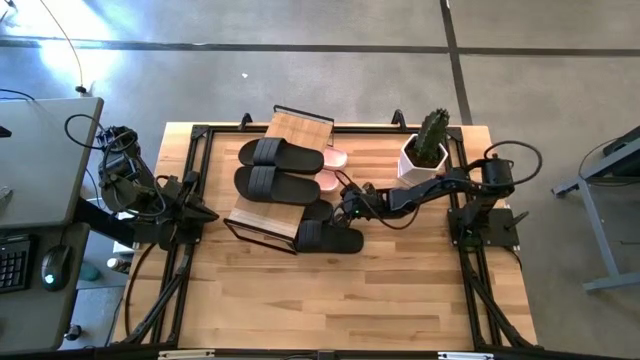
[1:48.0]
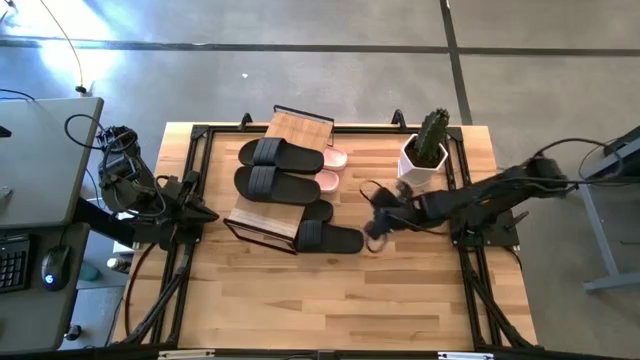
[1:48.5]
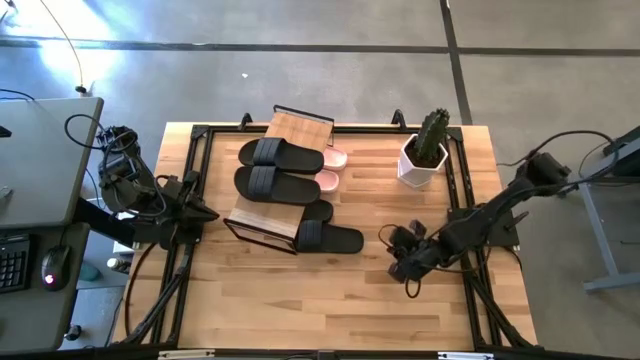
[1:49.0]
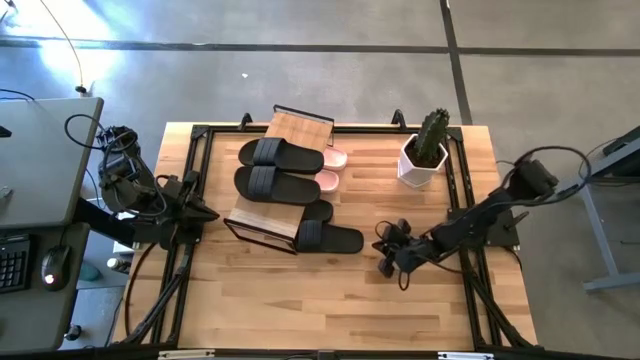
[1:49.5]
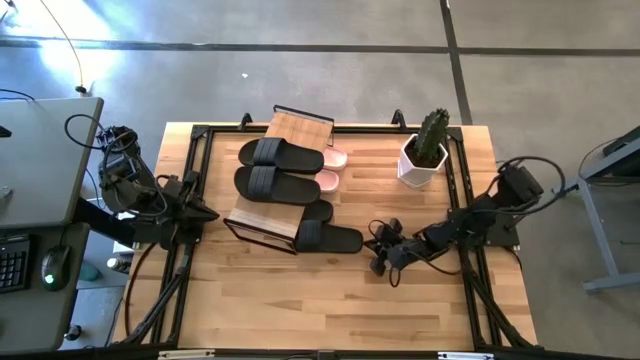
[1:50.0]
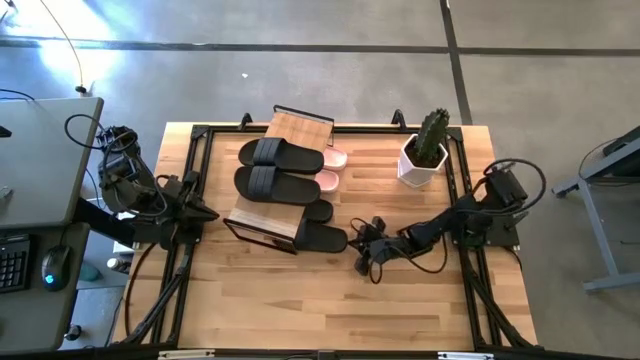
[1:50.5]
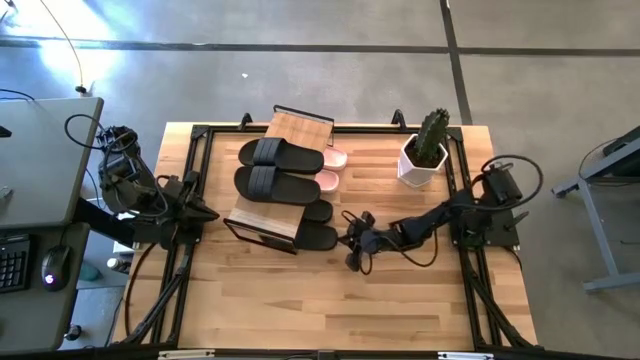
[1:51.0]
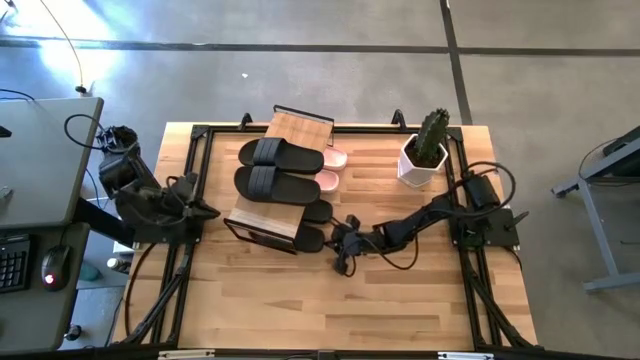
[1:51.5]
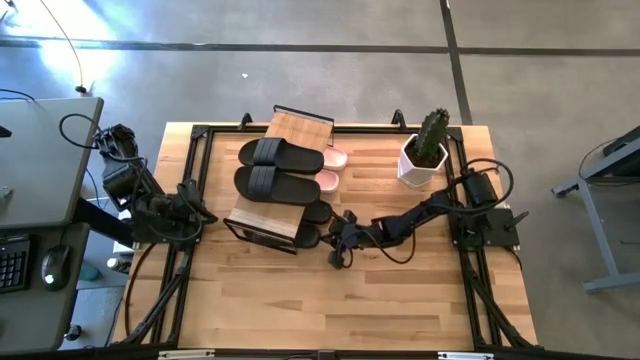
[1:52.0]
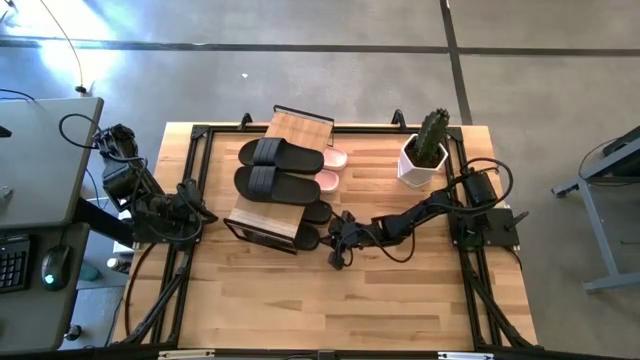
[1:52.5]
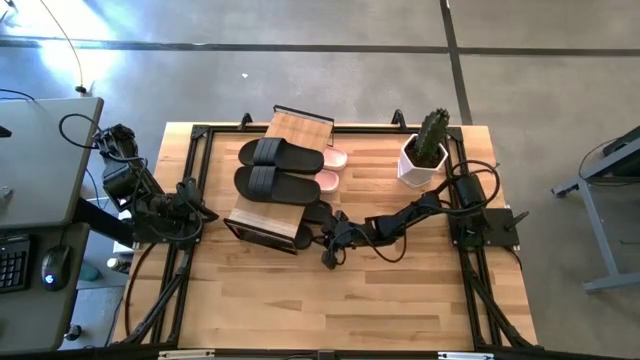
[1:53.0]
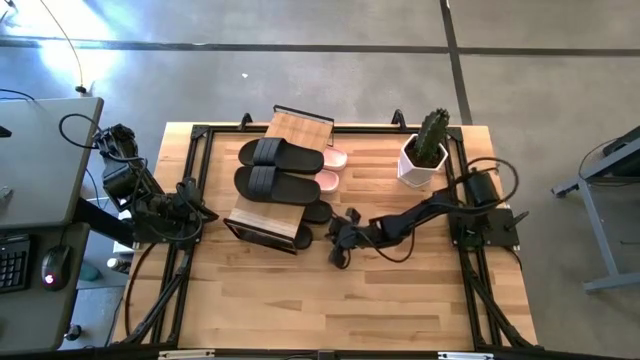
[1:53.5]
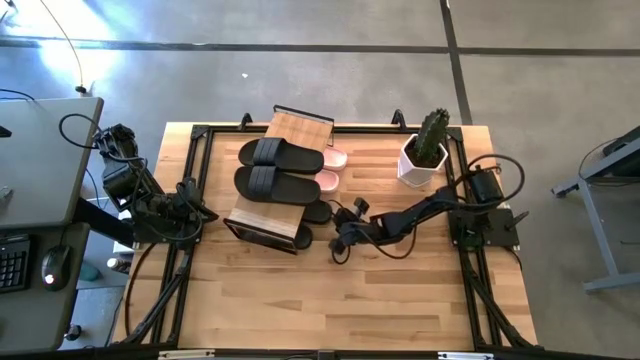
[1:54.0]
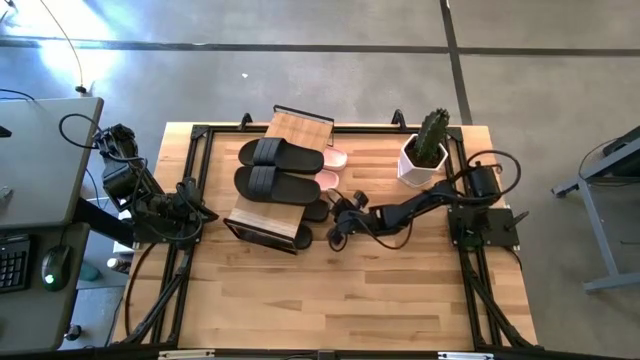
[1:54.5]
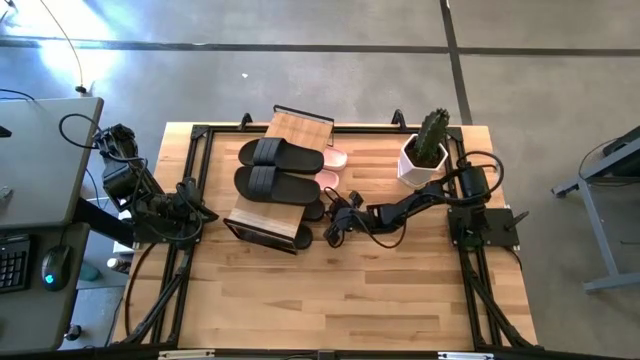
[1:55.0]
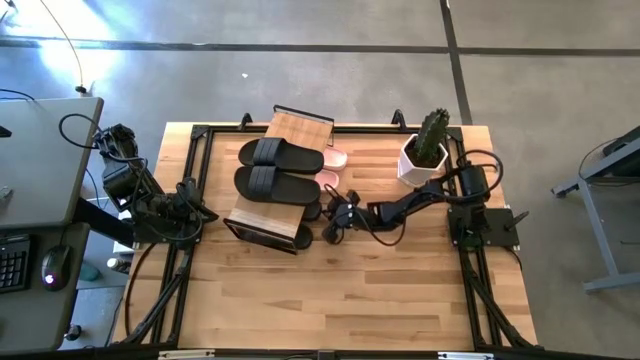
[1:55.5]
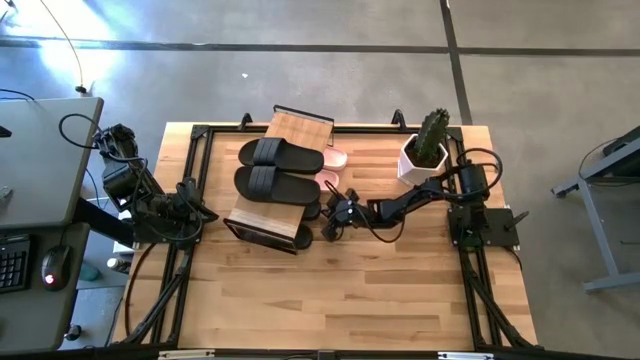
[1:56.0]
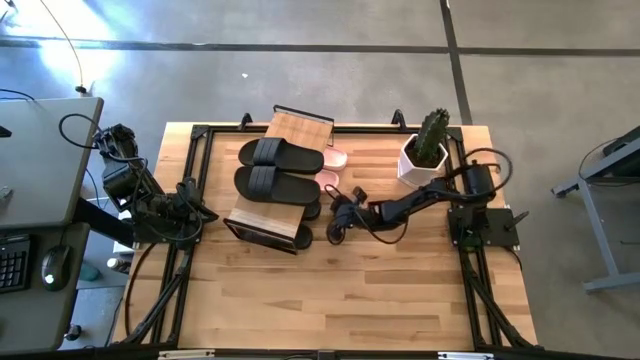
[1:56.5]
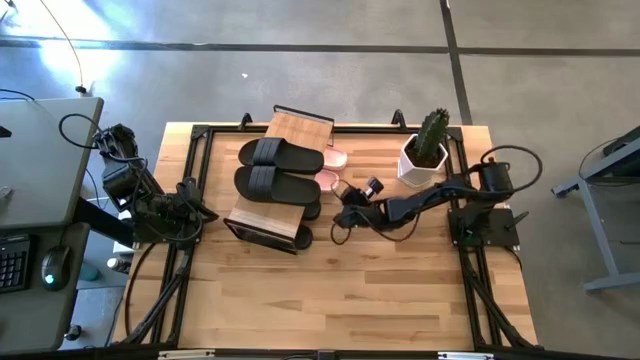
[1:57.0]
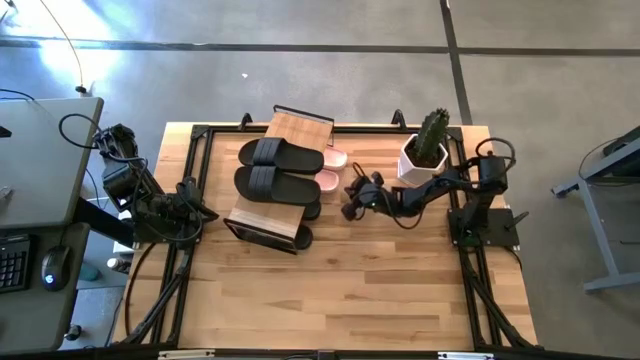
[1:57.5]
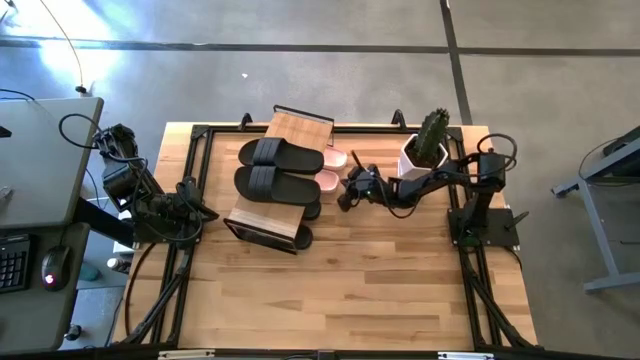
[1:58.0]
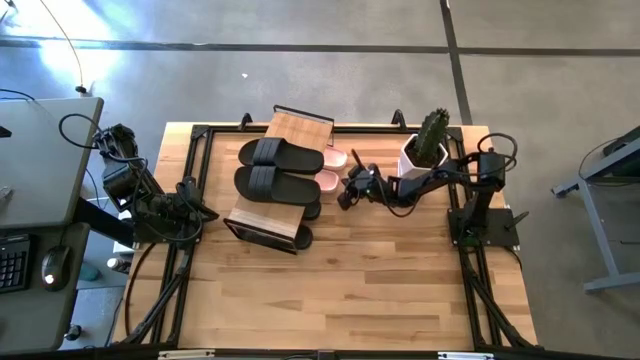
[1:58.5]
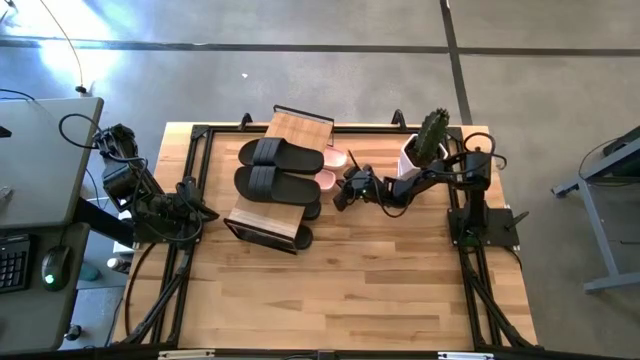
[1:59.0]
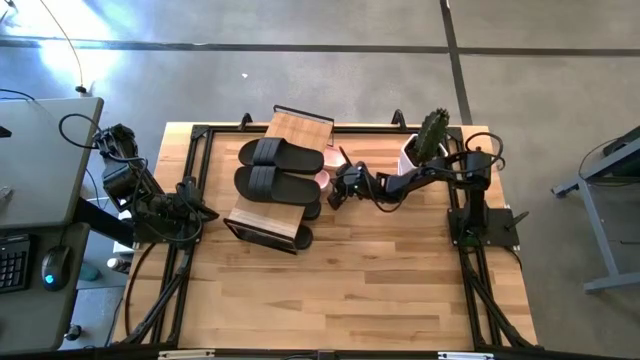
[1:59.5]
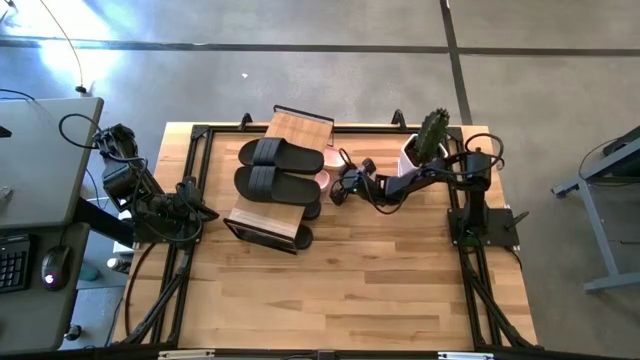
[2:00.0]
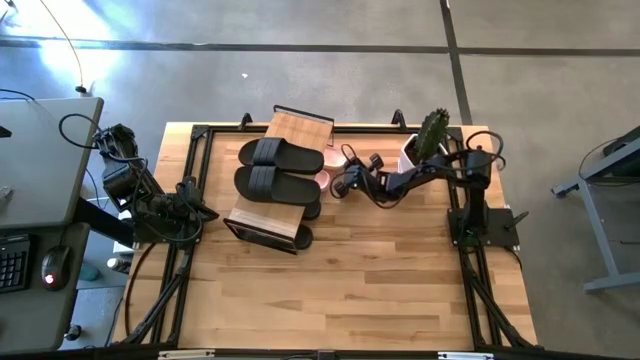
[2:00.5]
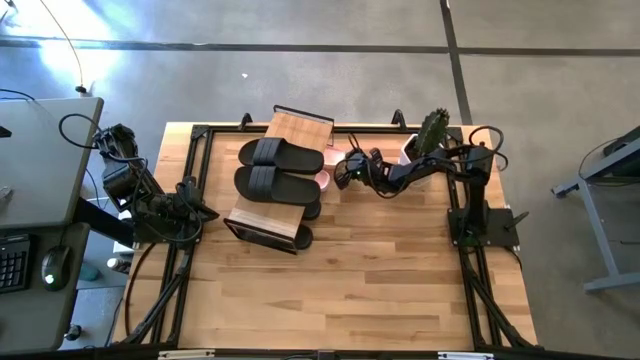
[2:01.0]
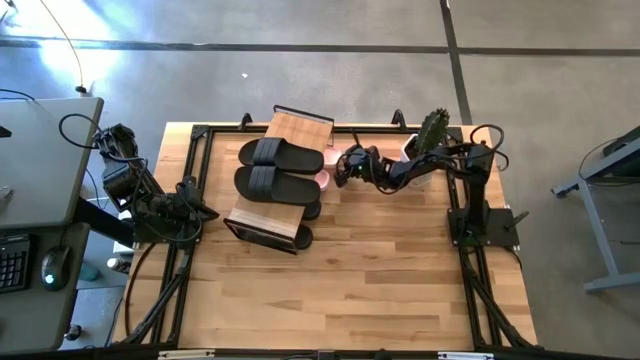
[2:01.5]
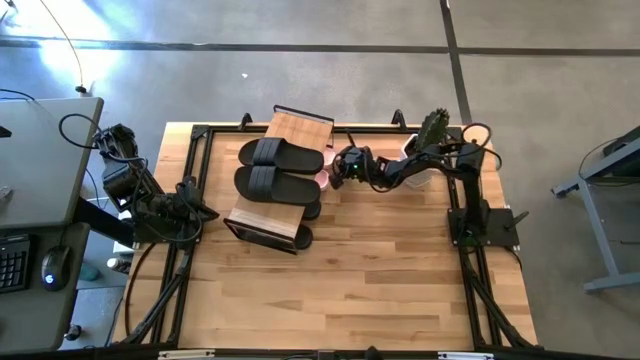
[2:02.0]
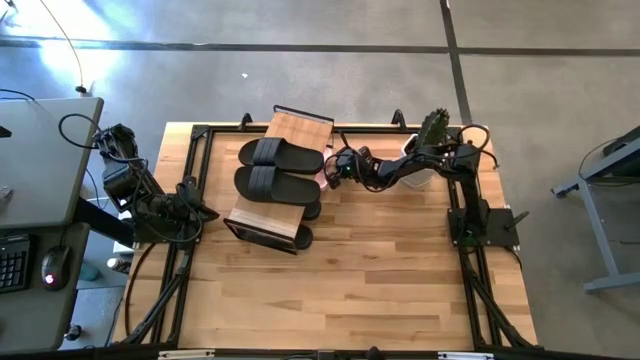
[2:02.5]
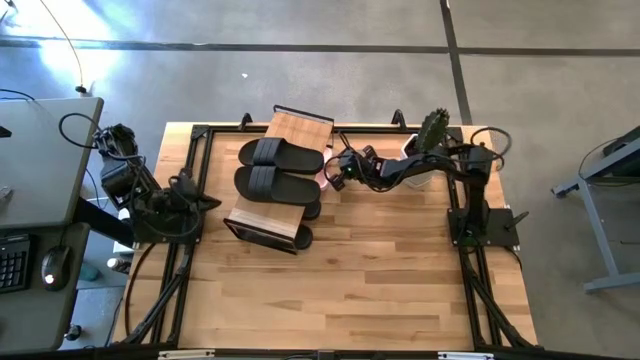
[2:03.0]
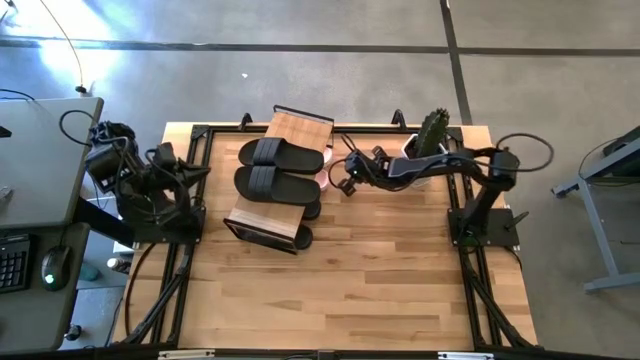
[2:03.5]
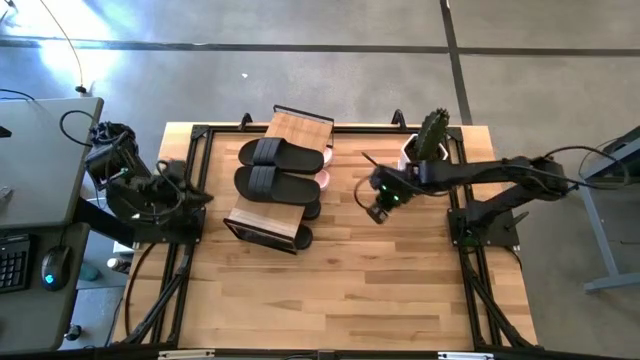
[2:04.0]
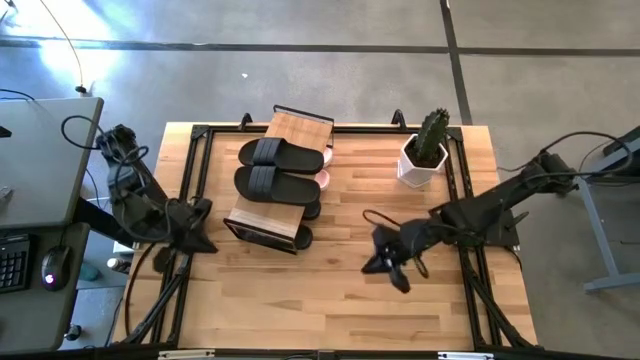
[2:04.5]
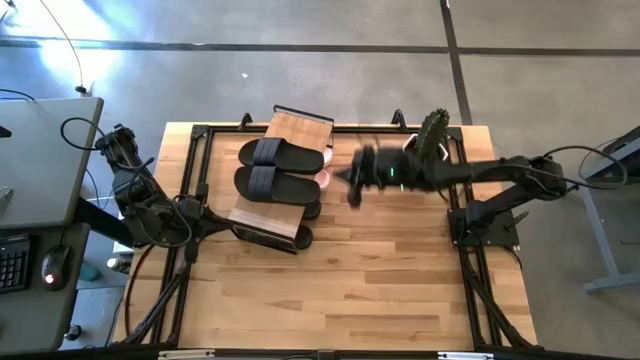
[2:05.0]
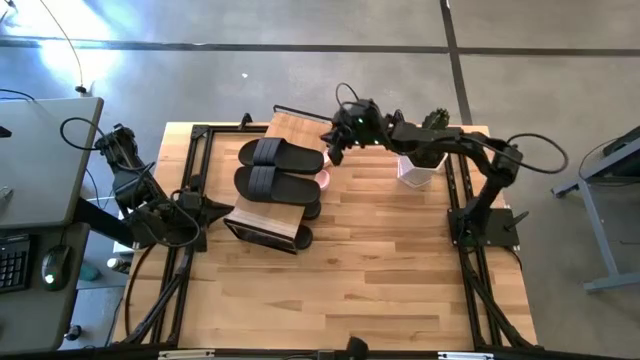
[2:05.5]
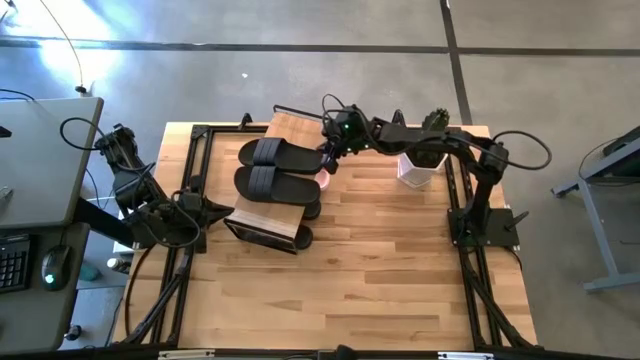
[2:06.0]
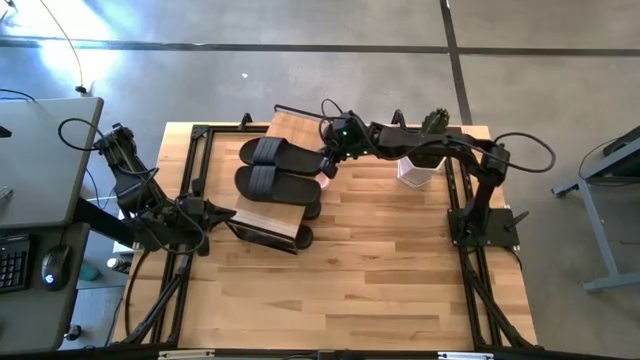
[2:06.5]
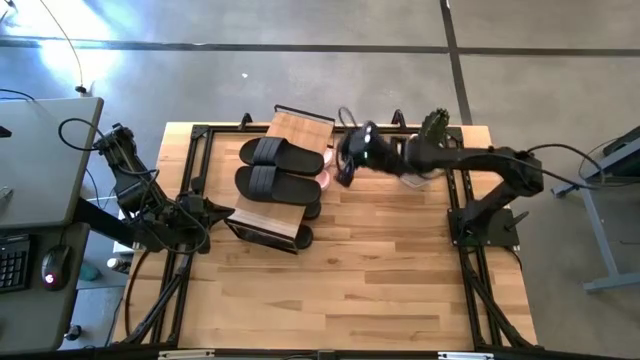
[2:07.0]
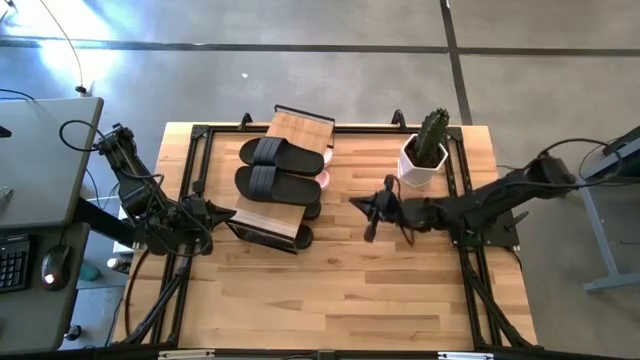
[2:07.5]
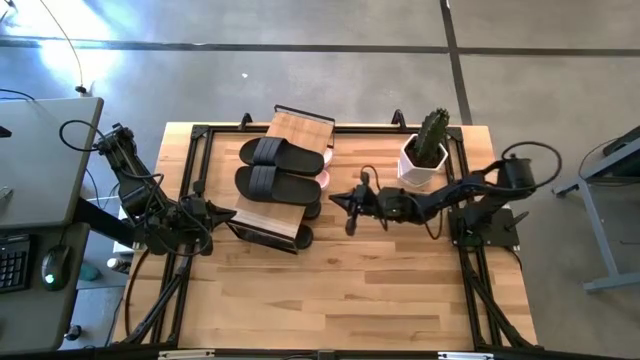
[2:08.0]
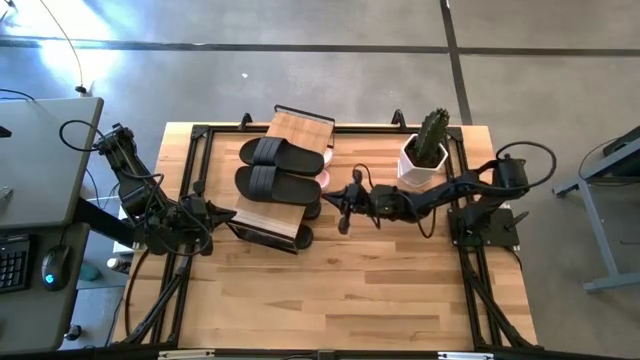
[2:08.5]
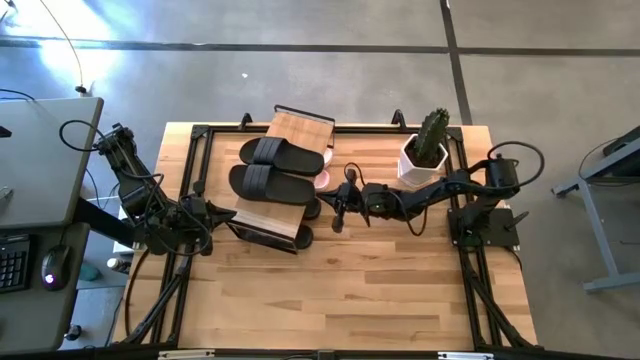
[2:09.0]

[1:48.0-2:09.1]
Task: Pick and place slides into the shelf
Adjust the slides under the shelf and on the shelf
